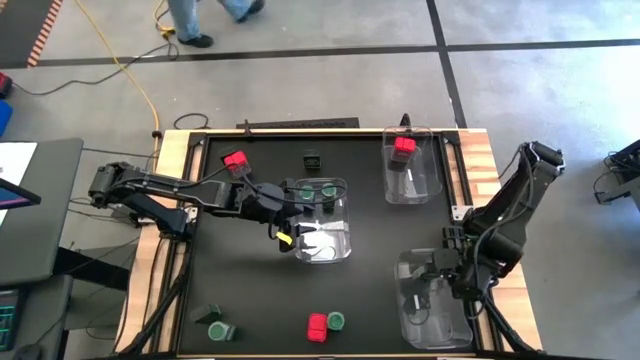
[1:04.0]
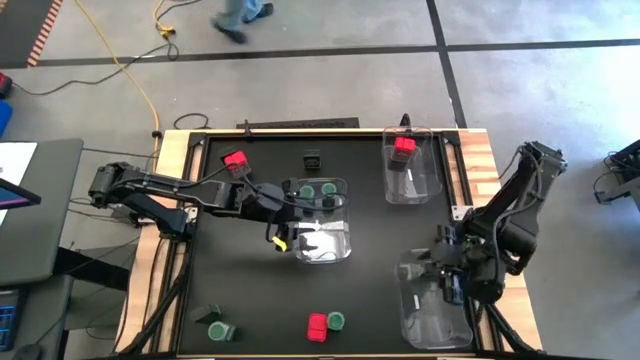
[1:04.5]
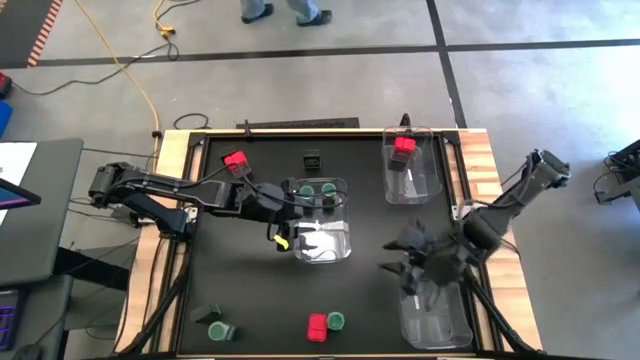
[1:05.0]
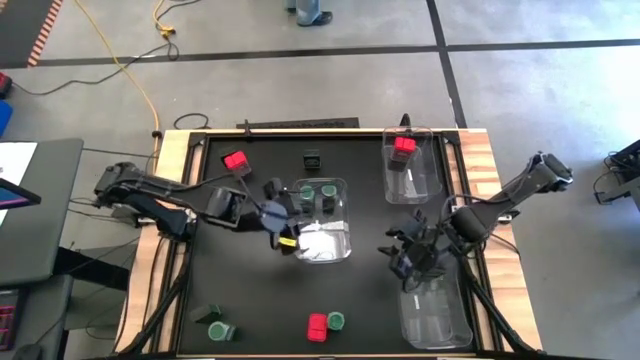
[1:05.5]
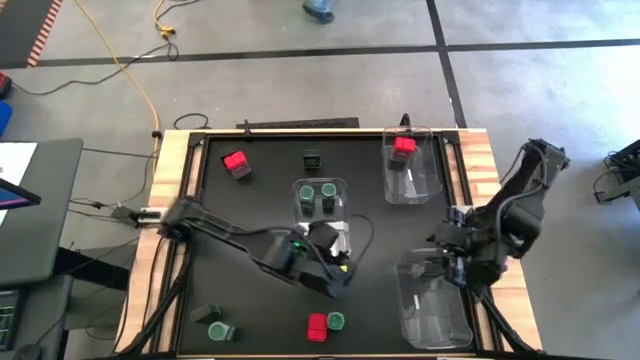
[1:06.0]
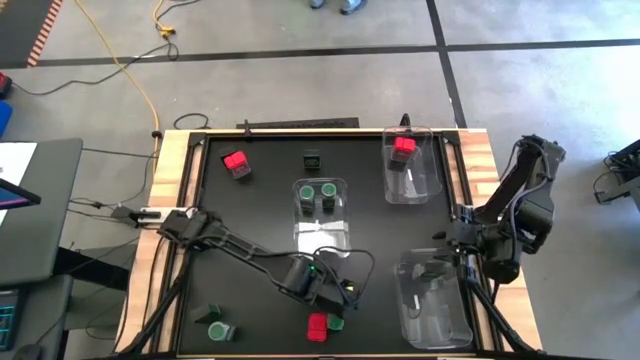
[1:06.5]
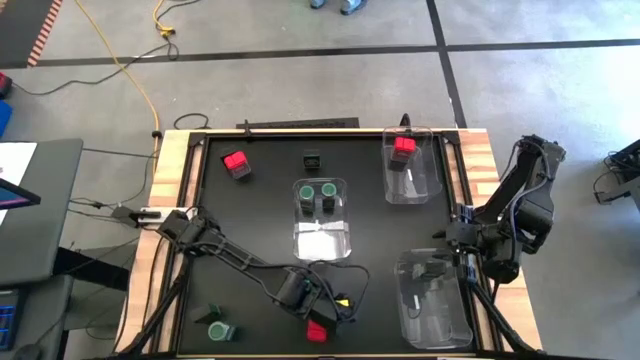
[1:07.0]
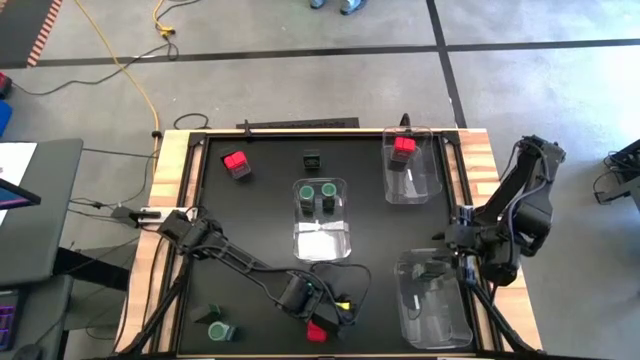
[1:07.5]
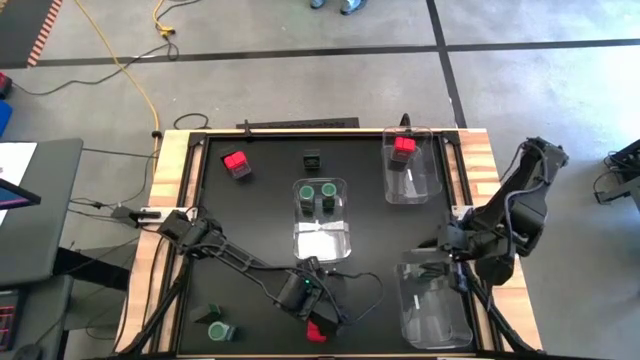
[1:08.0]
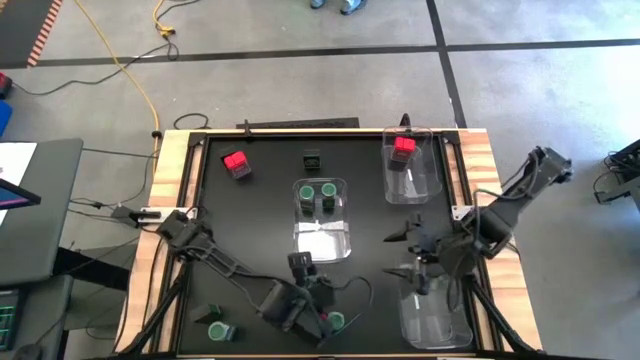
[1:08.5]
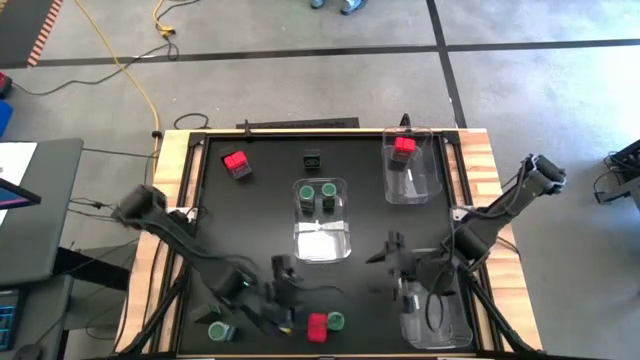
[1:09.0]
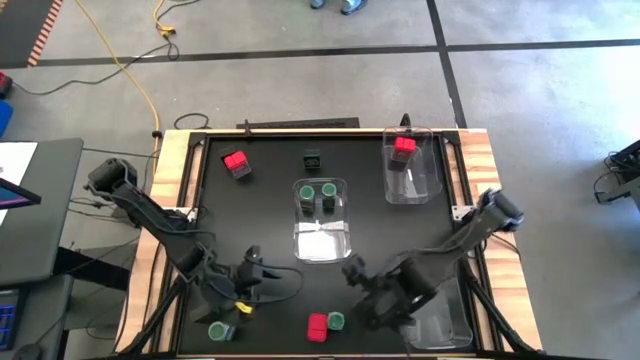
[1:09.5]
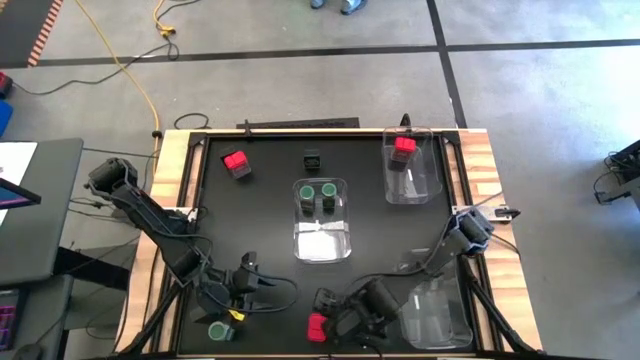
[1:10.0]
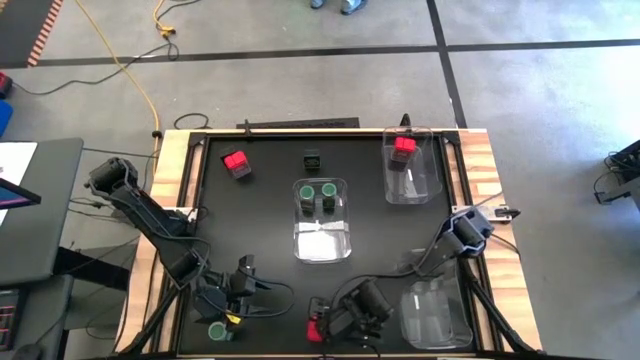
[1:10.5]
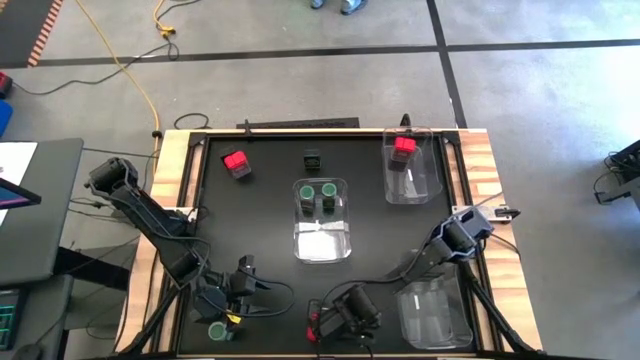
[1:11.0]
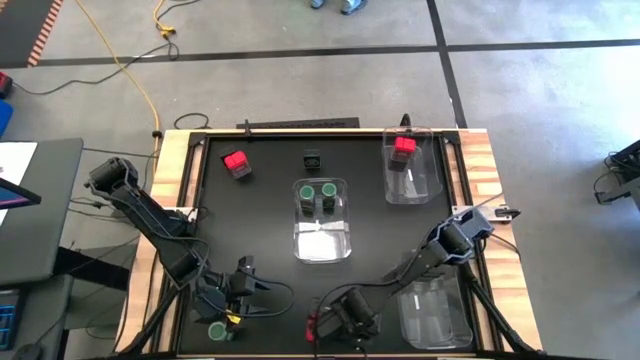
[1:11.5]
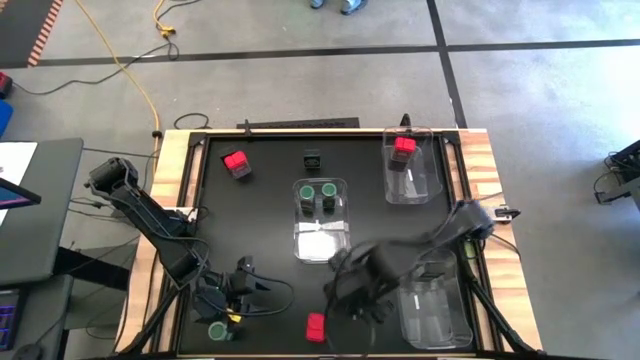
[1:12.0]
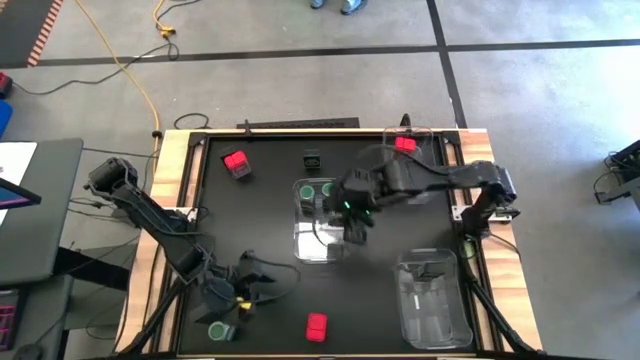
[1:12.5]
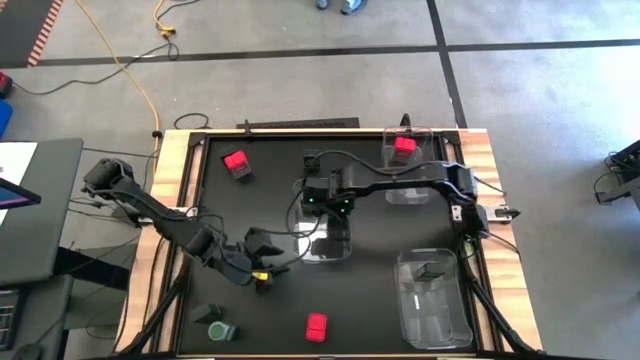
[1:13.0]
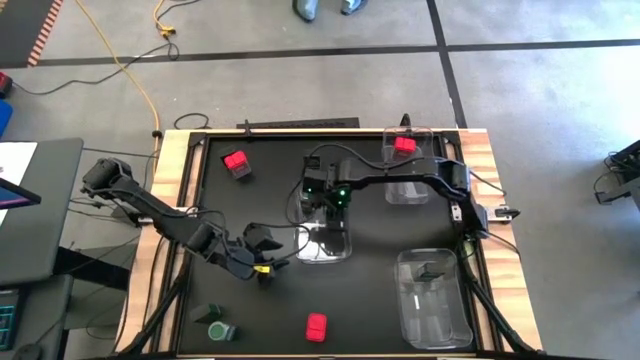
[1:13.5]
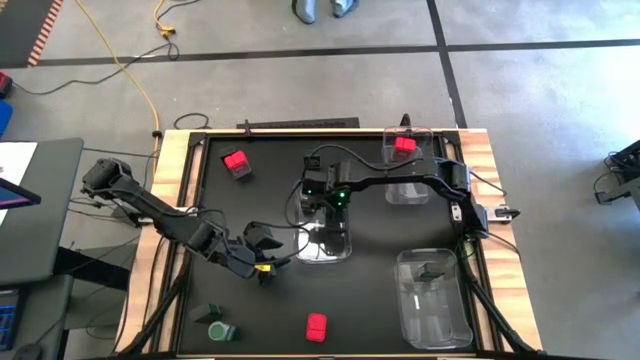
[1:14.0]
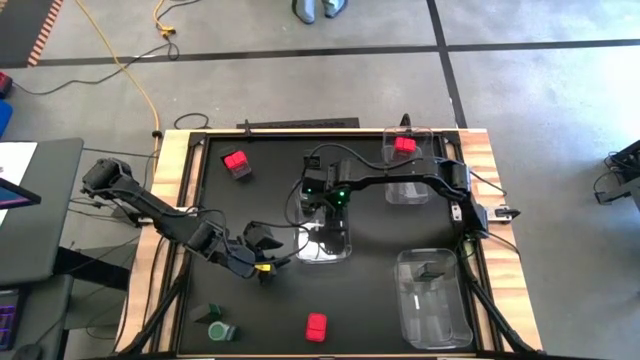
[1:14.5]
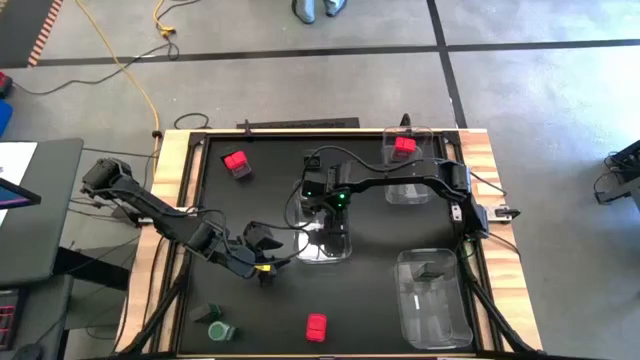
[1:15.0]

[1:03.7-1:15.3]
Task: Sort spices by type
Put the green seasoning bottle into the middle left transparent bin

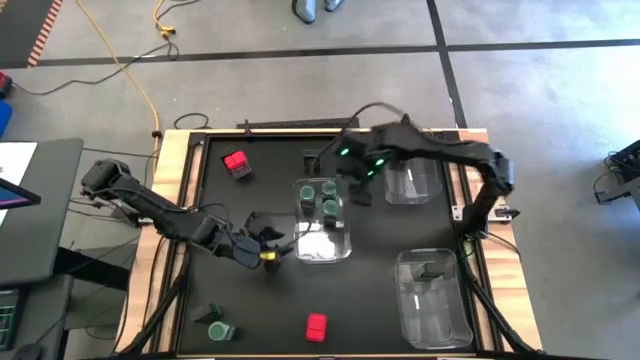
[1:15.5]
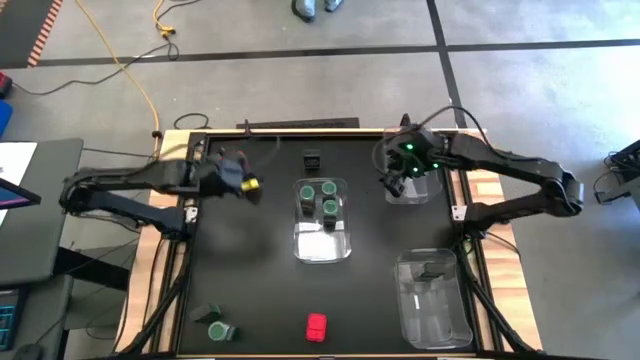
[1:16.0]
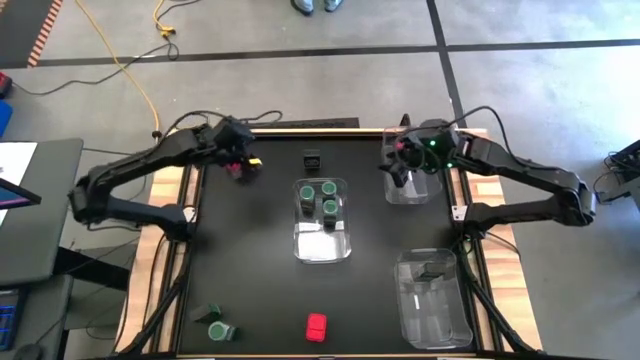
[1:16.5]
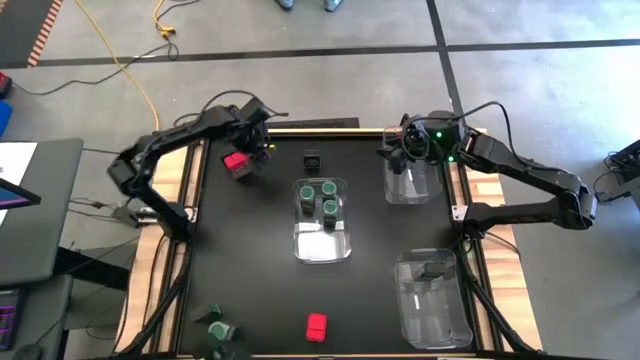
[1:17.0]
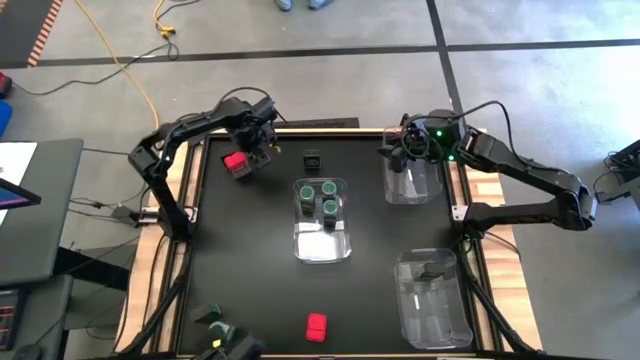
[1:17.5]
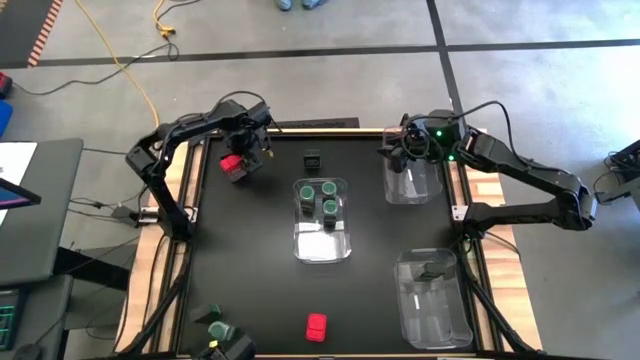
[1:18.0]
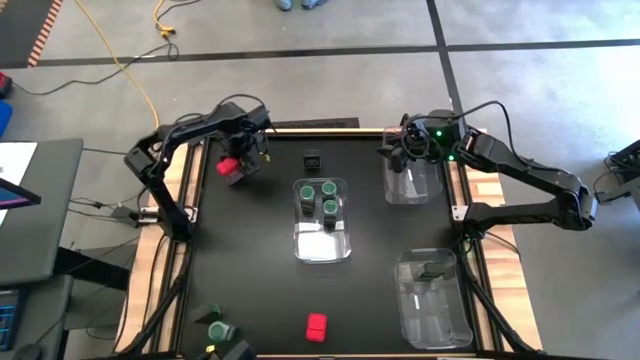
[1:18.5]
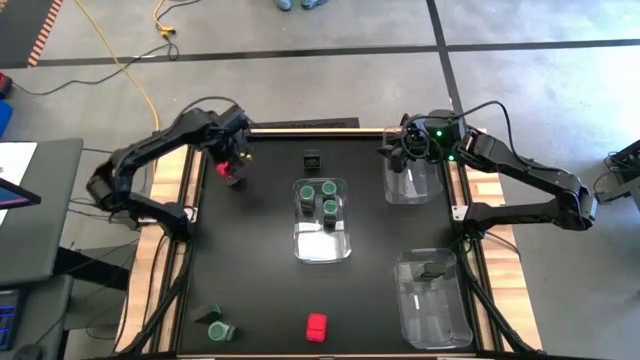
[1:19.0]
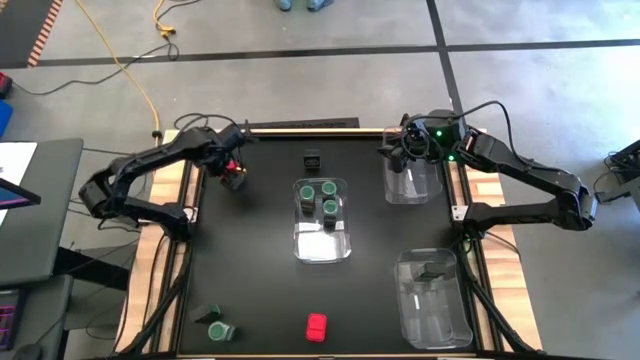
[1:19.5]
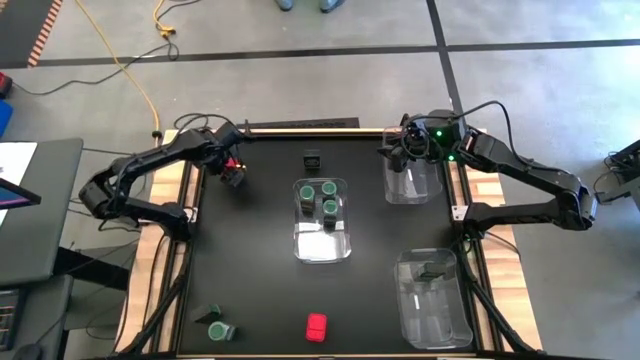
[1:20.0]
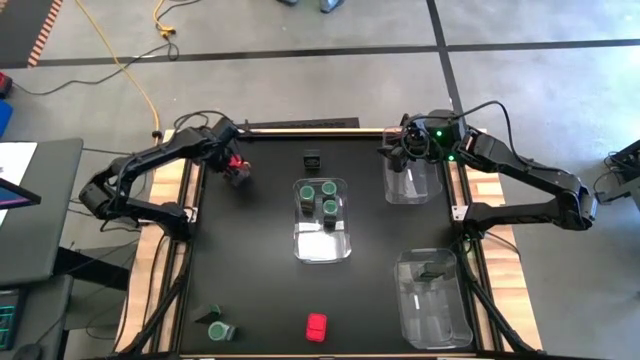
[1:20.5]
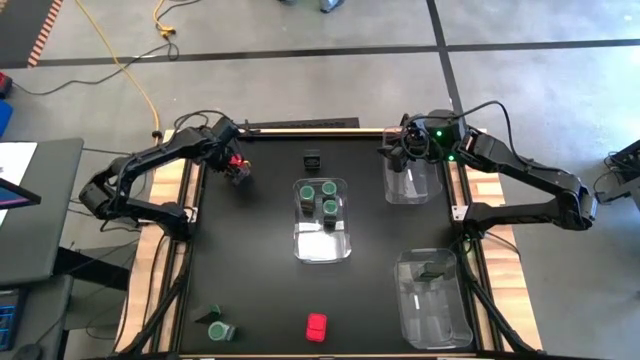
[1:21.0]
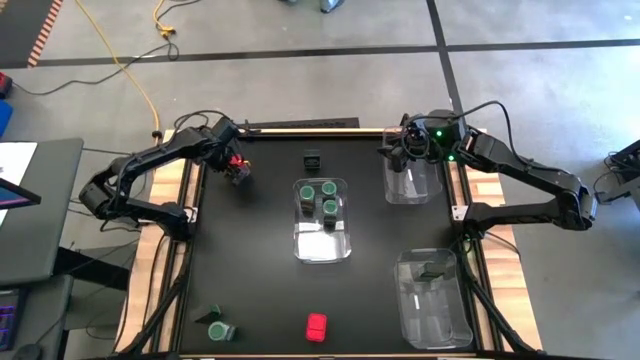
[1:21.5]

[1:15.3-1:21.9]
Put the red seasoning can into the top transparent bin

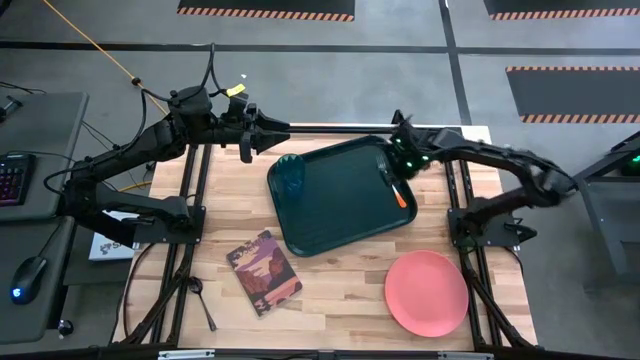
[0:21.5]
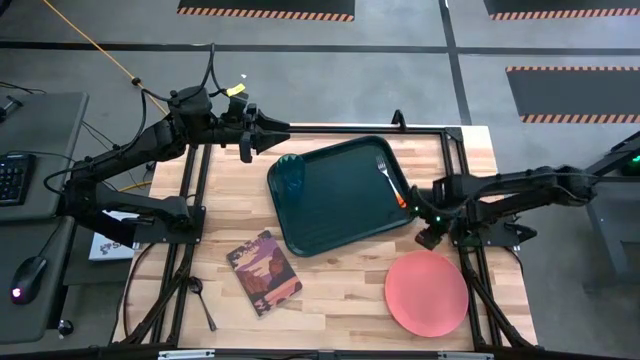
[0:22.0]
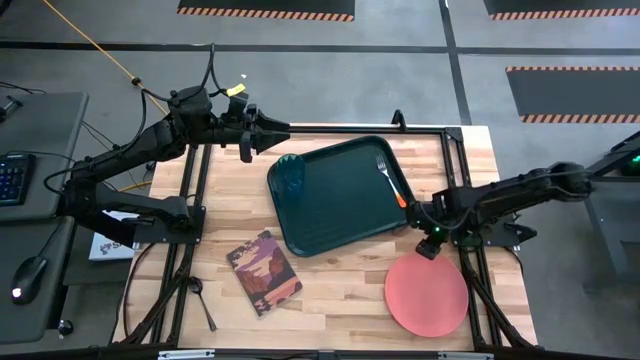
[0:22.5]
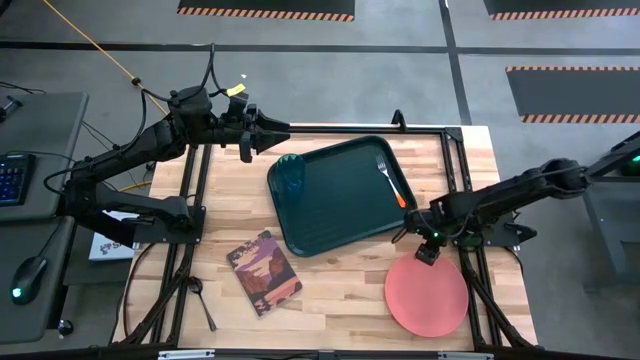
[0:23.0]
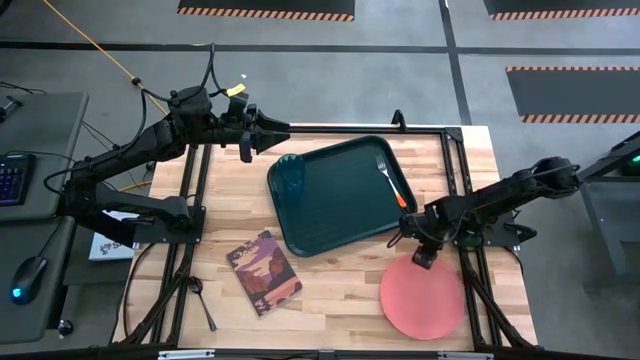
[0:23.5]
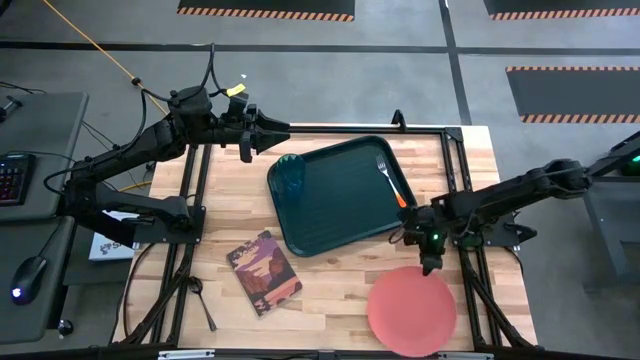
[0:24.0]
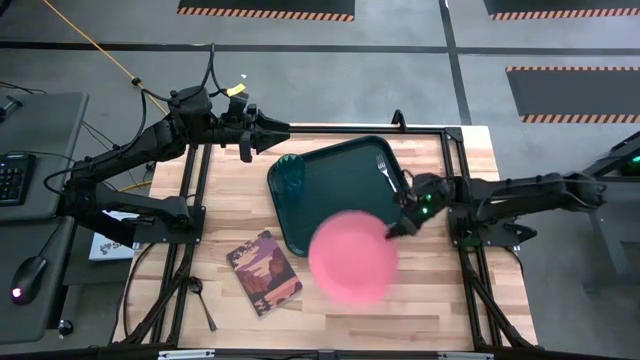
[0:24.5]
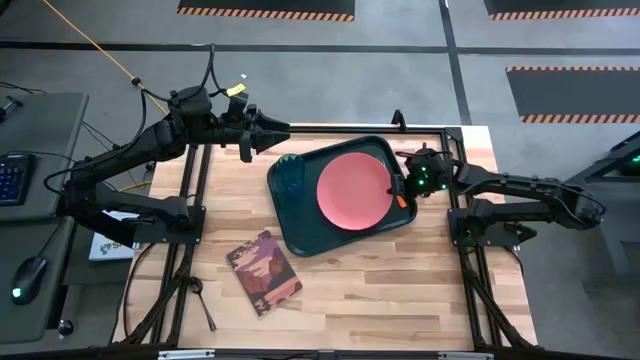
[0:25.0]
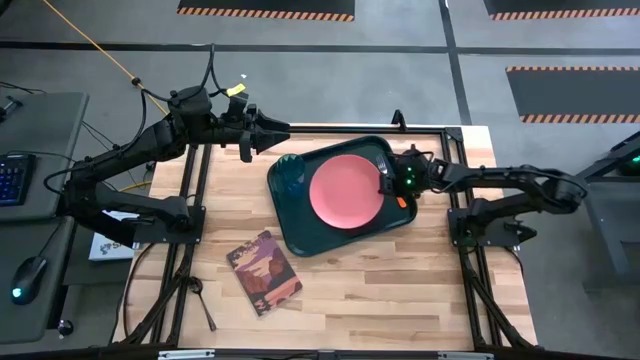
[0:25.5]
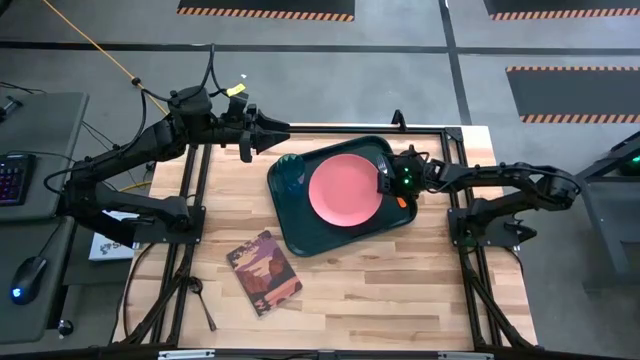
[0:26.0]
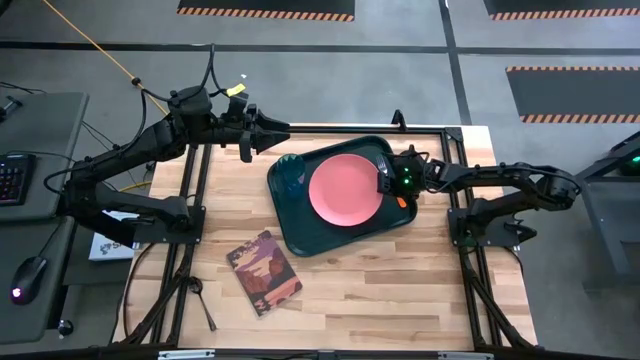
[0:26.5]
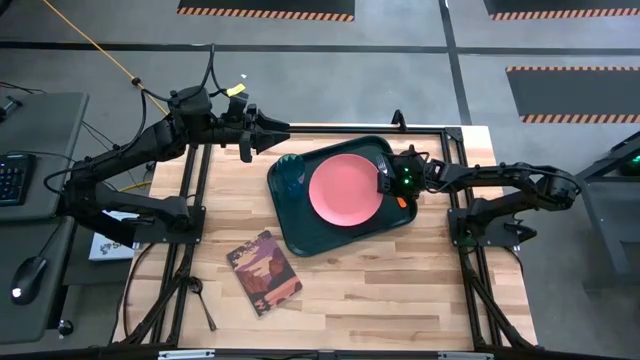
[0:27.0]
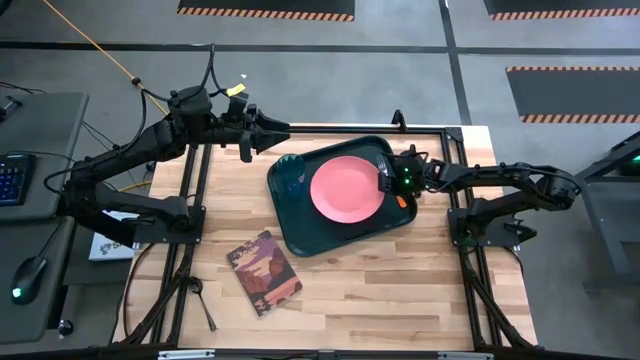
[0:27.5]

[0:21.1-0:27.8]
Task: Pick and place plate/cup/fork/spoon on tray
Put the pink plate on the black tray
